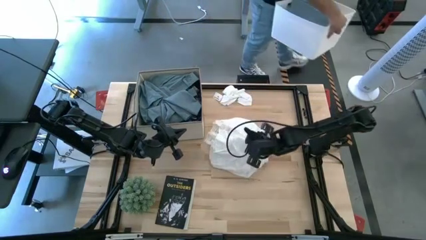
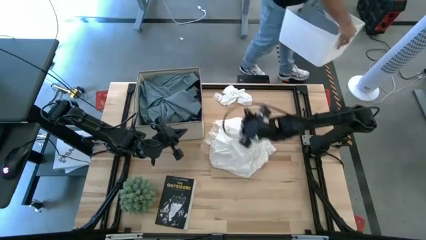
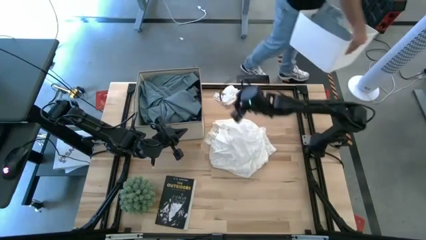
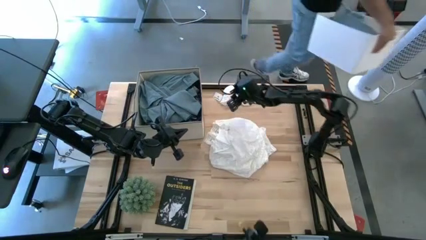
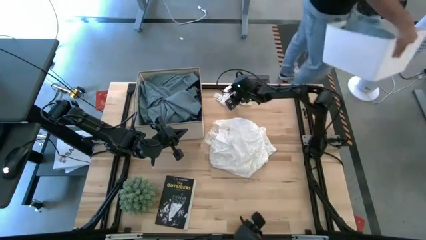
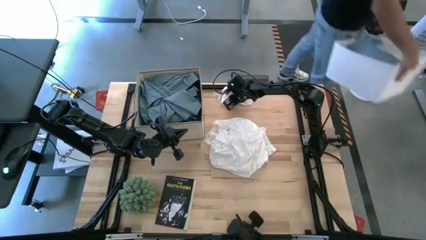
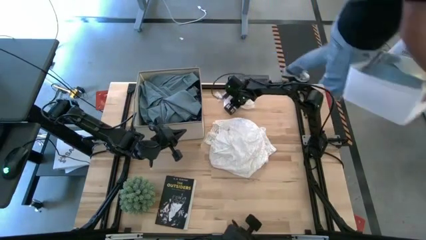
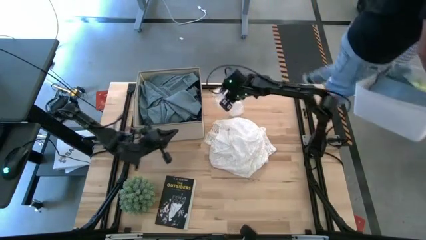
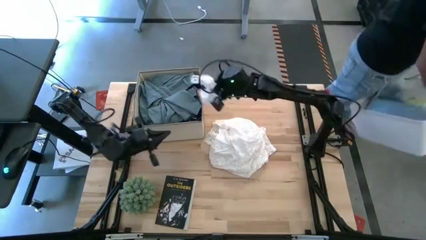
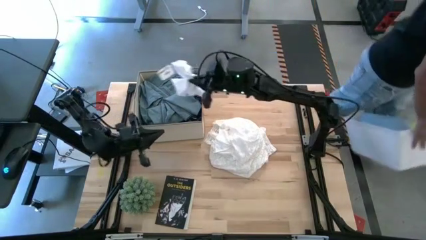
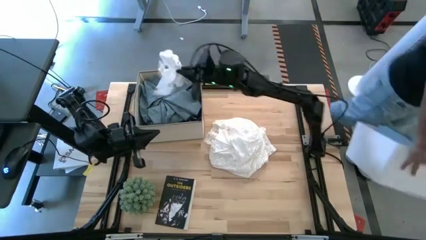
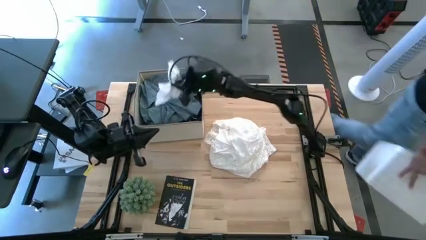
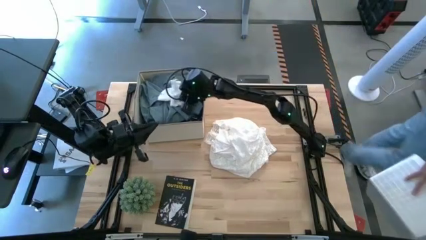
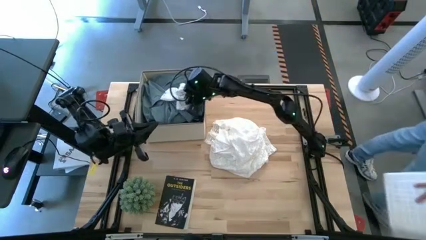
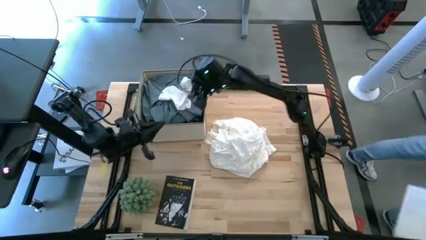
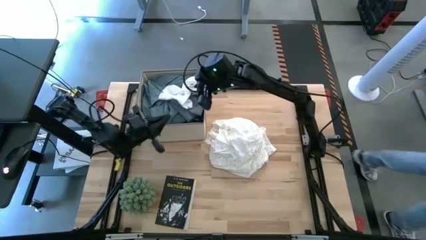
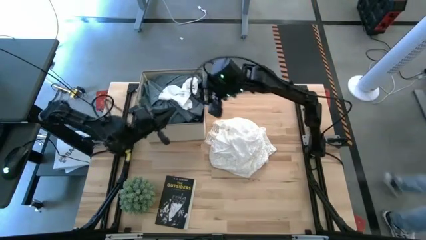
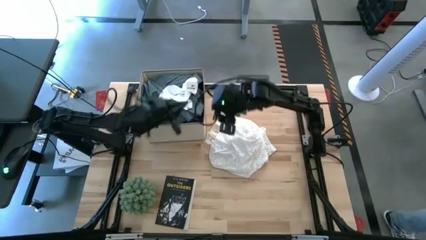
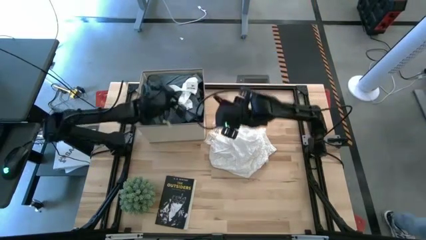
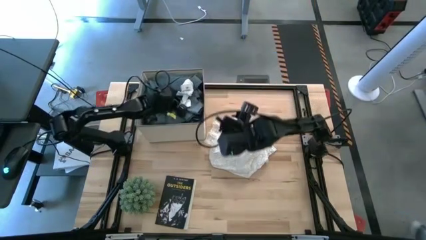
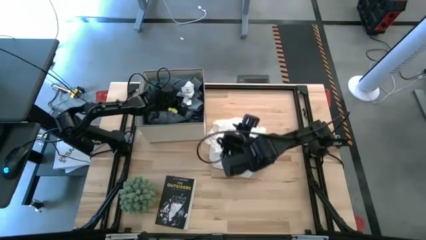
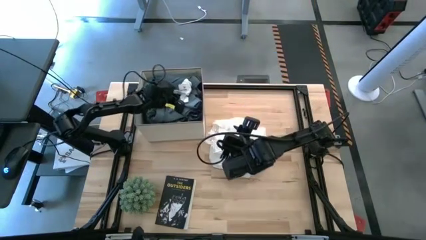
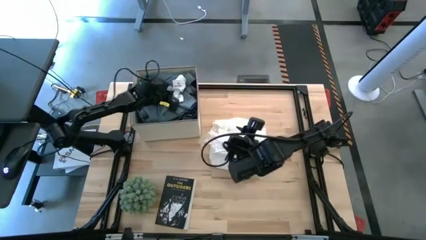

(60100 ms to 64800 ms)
Task: Sort clothes
Put the white socks into the laundry organizer

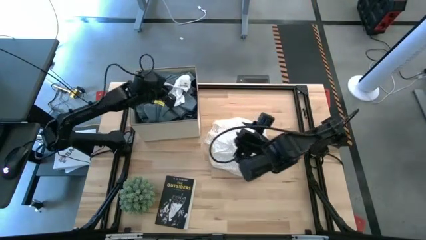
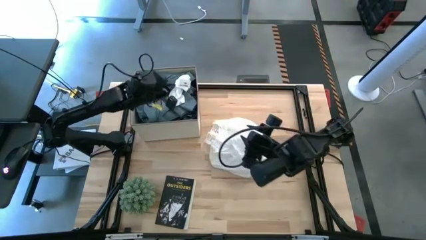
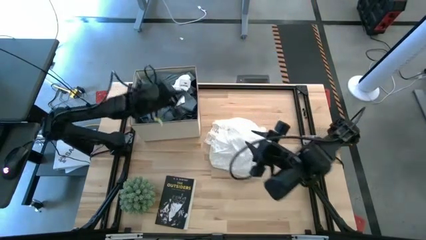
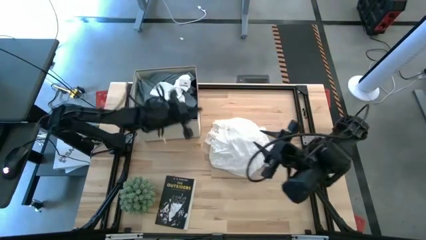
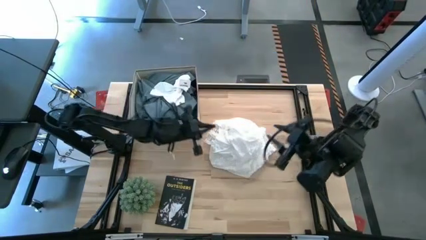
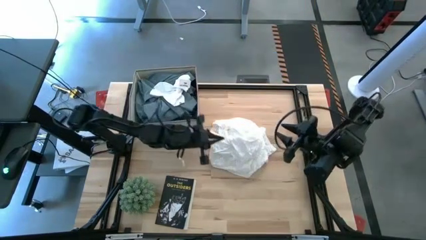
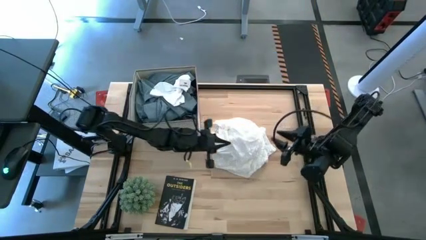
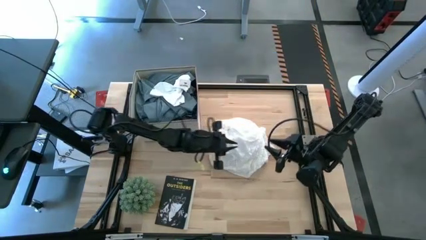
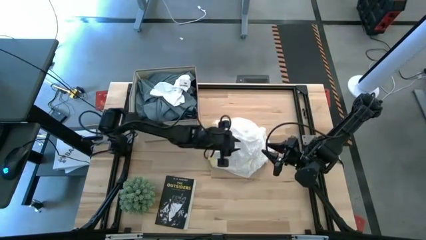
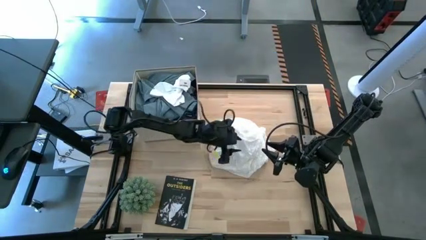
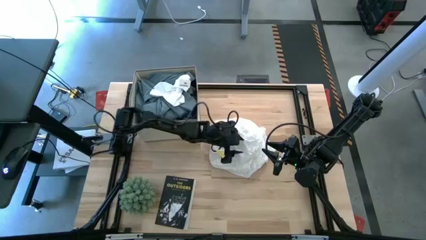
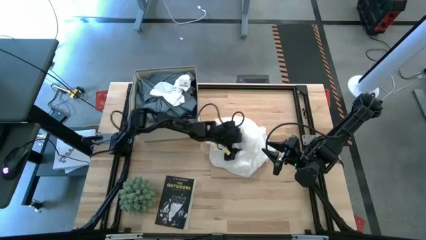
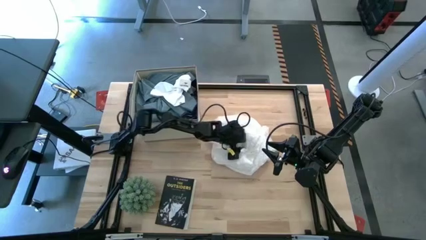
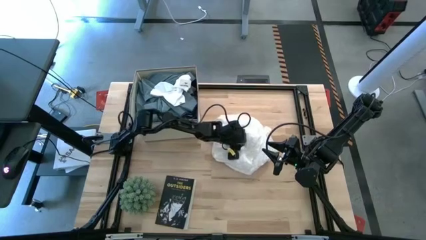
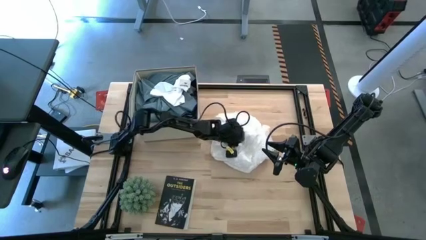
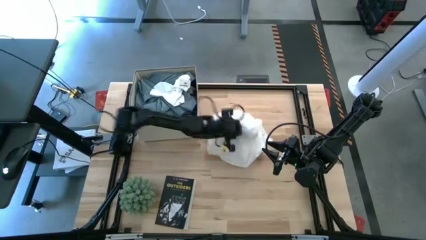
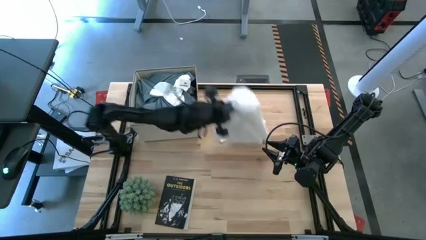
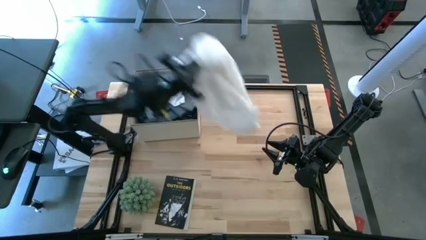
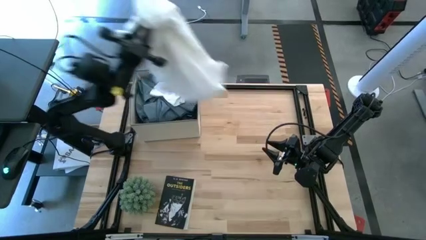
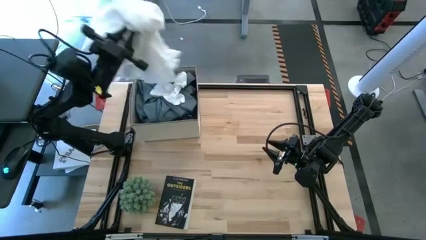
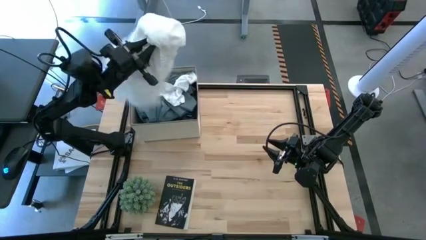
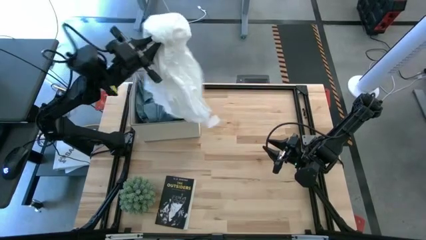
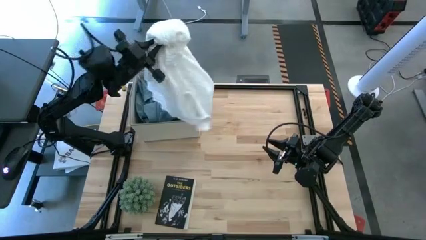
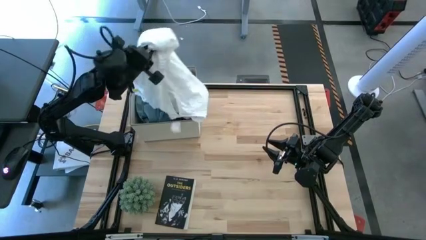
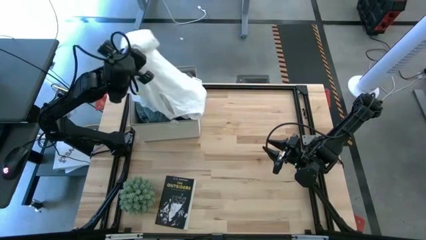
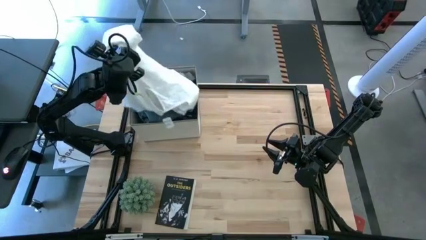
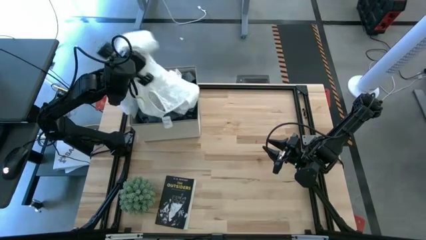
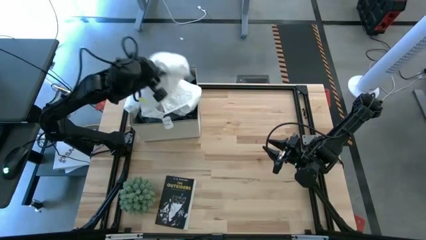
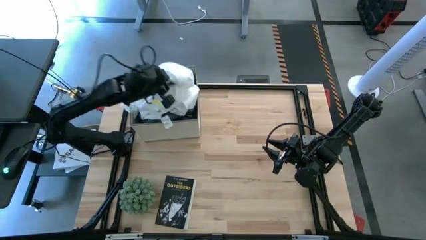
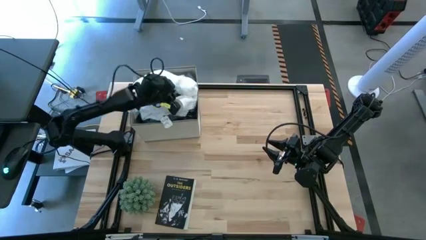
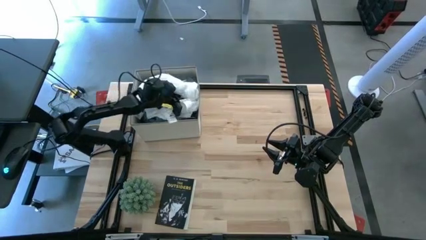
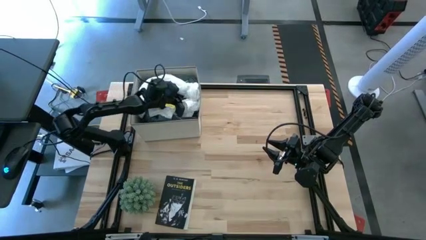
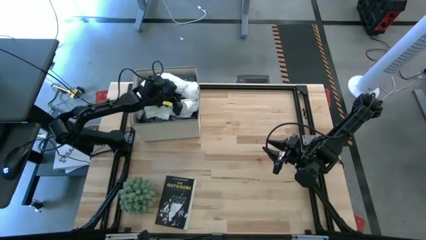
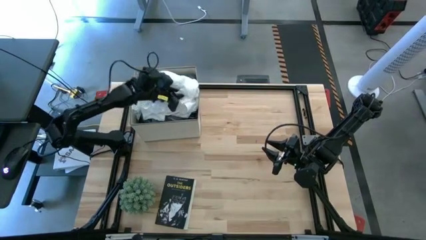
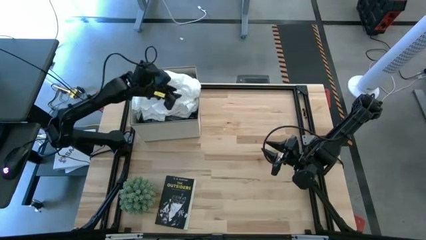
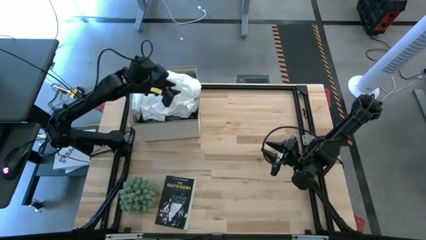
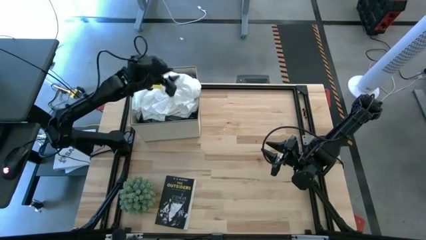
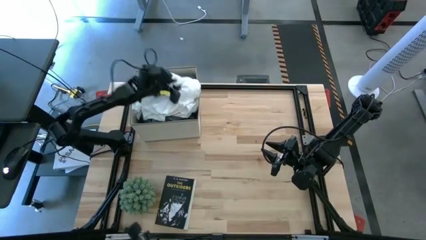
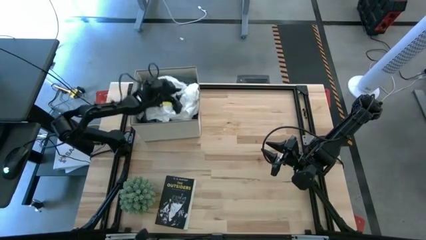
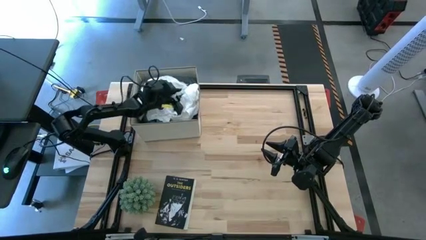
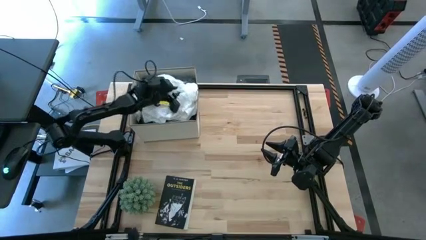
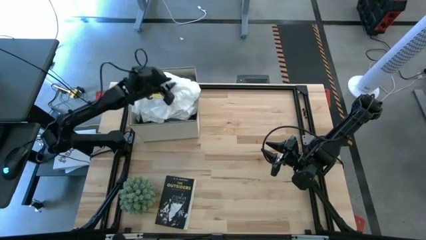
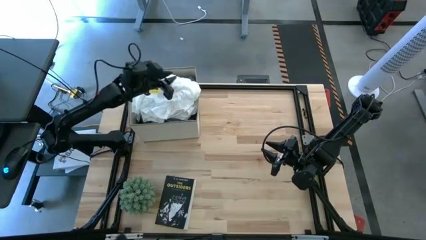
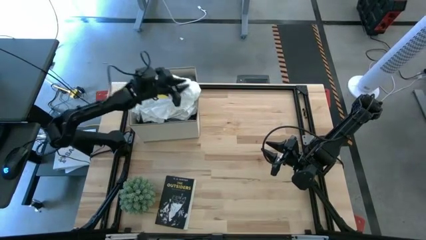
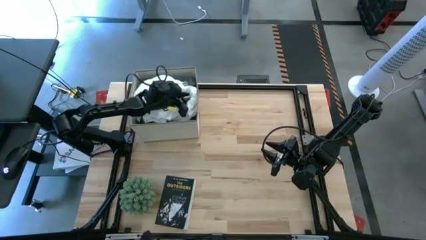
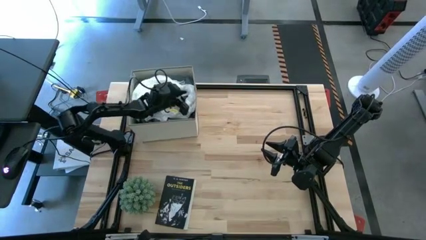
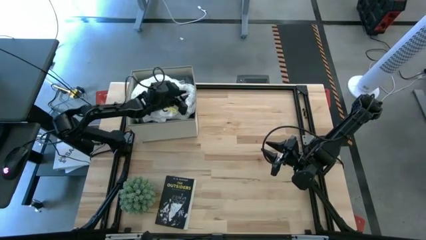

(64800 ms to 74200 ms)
Put the white dress into the laundry organizer

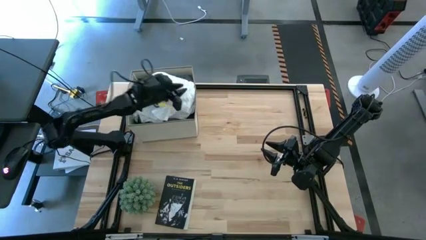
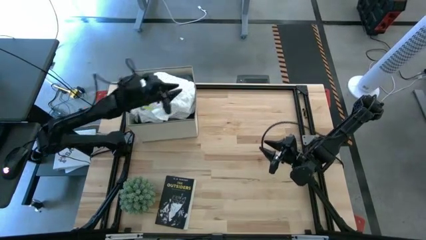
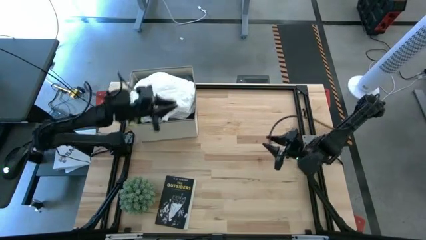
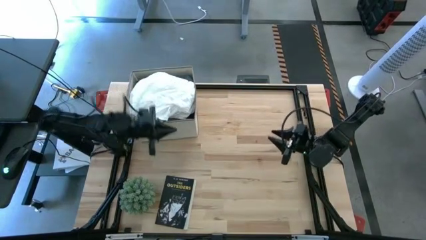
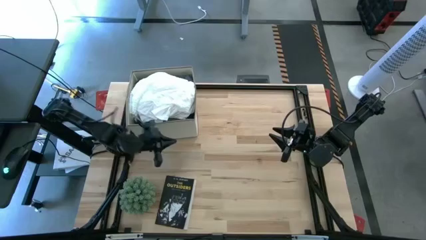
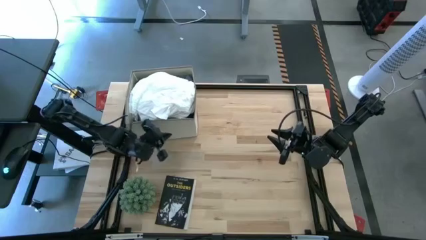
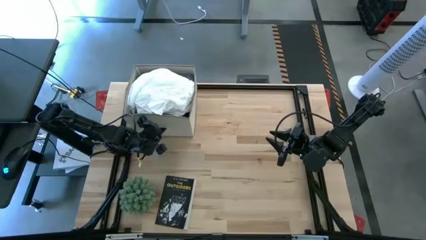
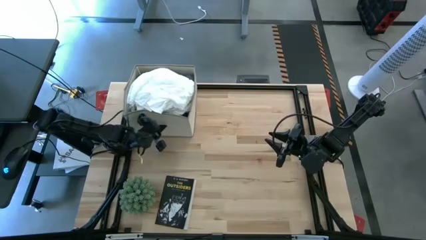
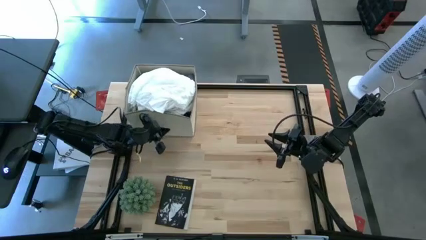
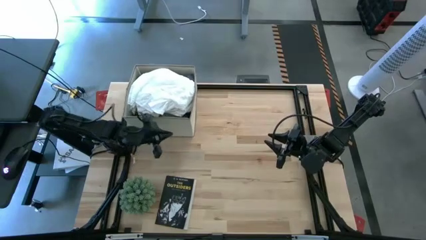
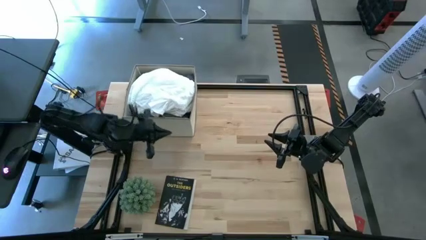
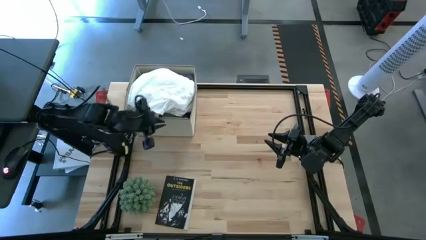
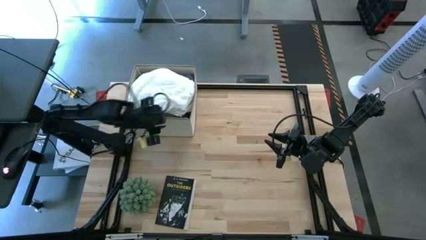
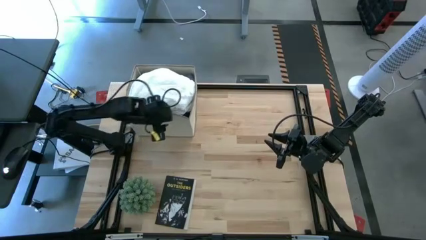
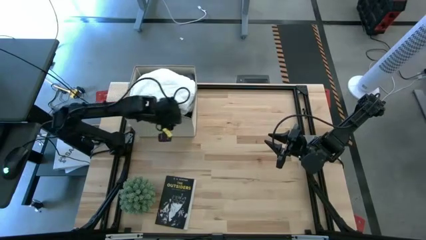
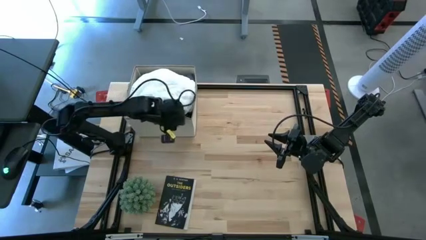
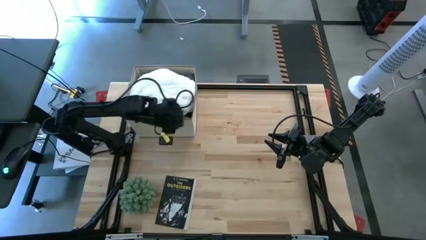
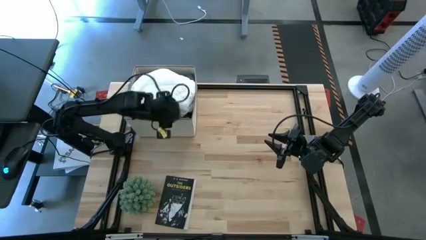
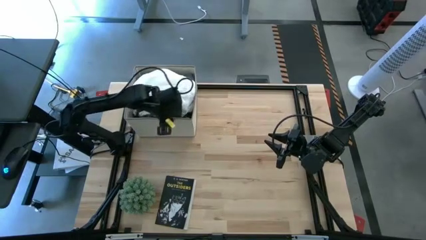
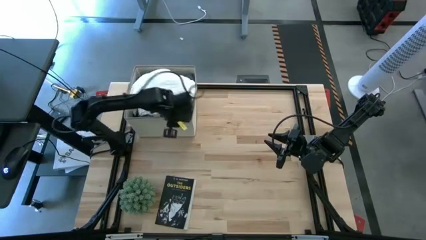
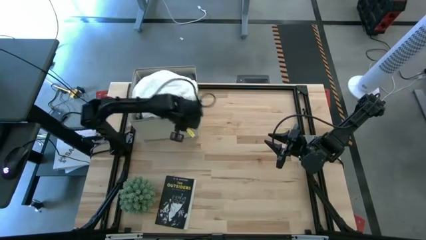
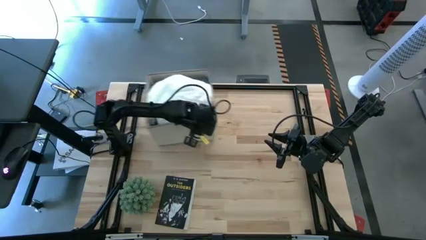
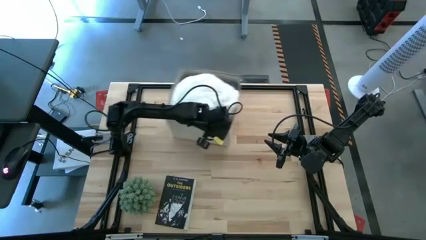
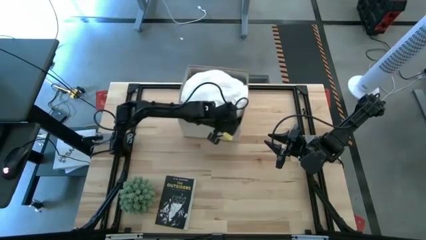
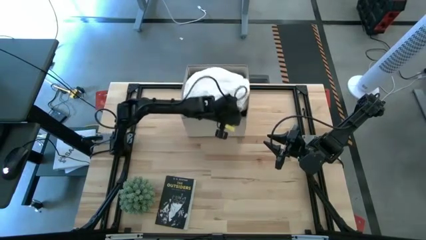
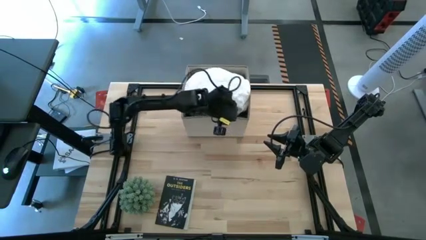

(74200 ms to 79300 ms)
Move the laundry organizer to the upper middle of the table
